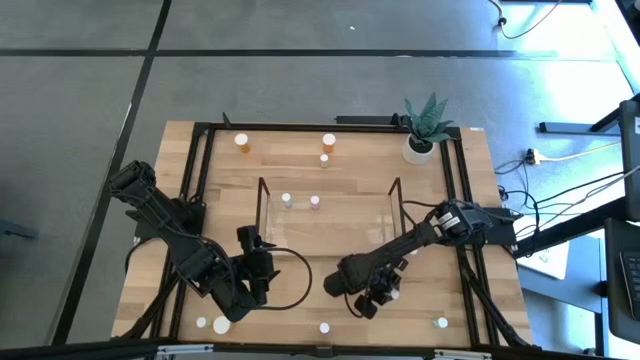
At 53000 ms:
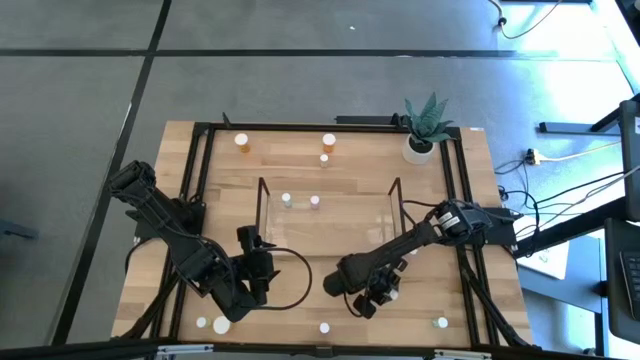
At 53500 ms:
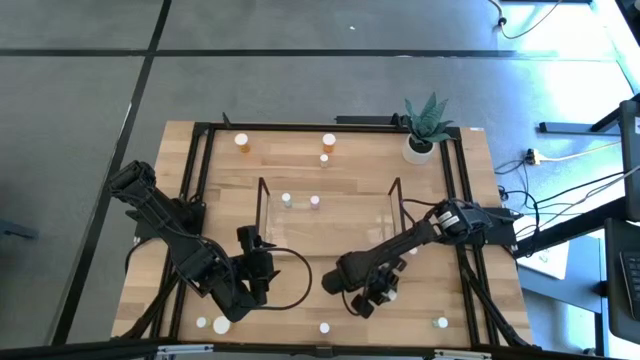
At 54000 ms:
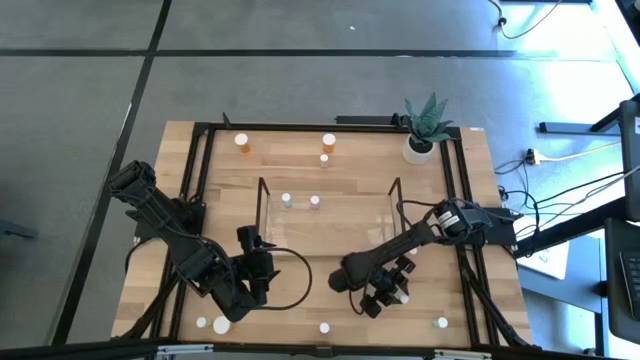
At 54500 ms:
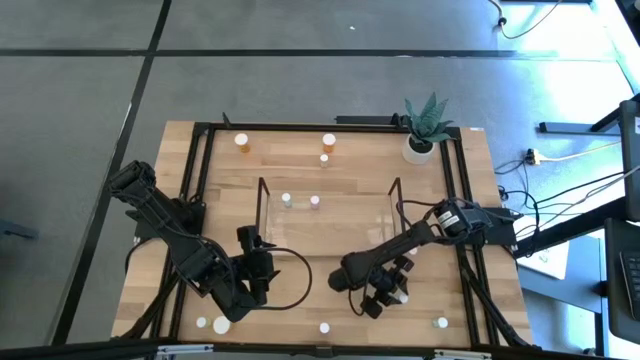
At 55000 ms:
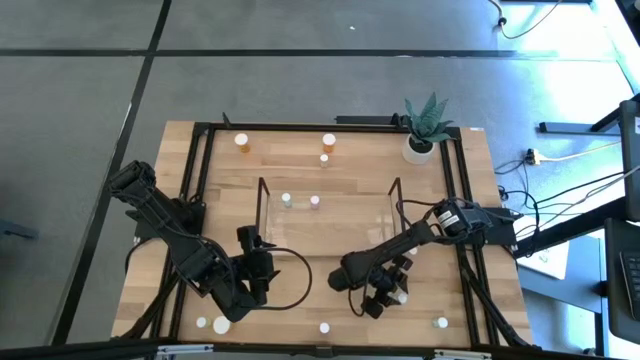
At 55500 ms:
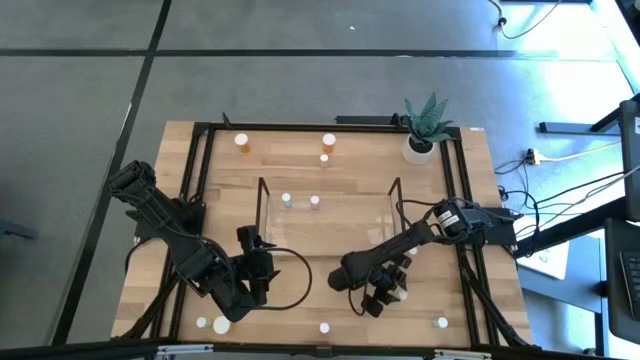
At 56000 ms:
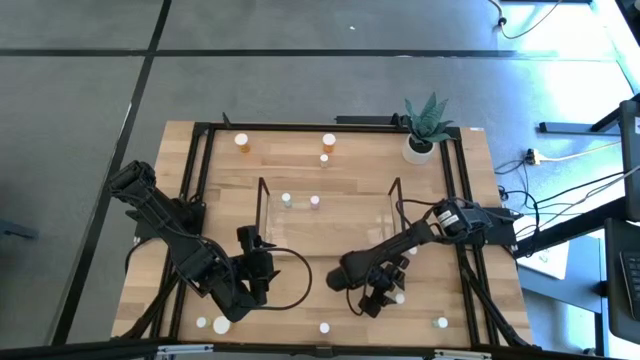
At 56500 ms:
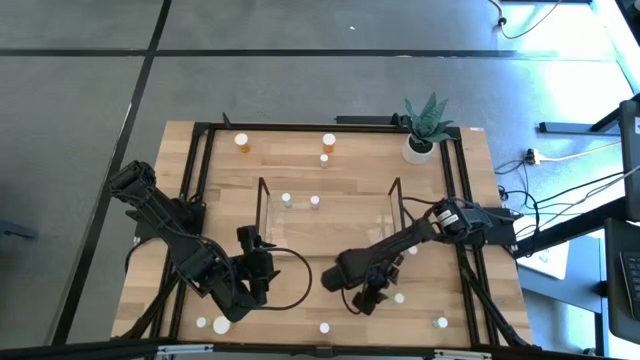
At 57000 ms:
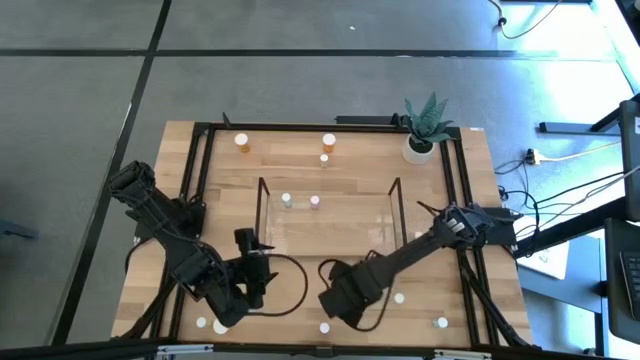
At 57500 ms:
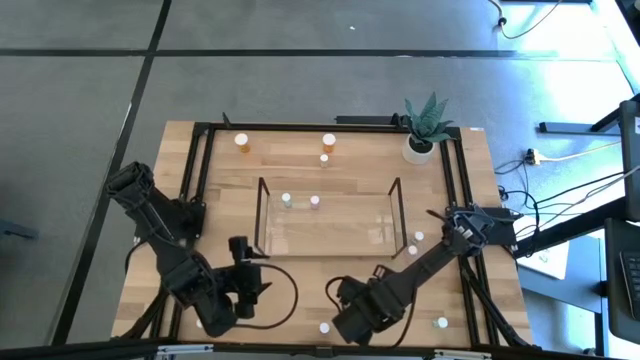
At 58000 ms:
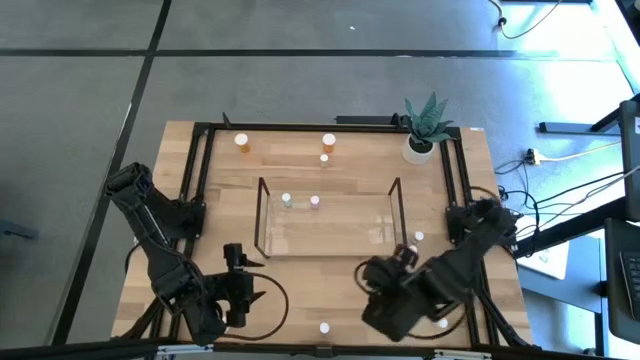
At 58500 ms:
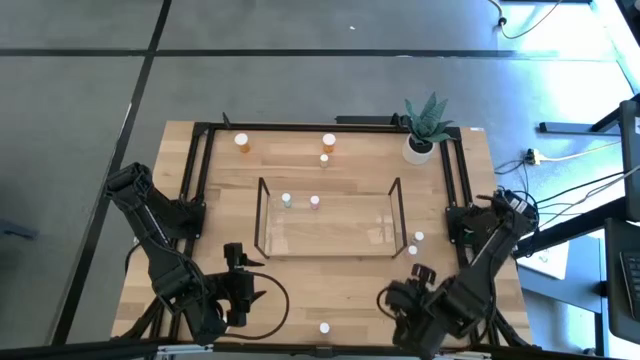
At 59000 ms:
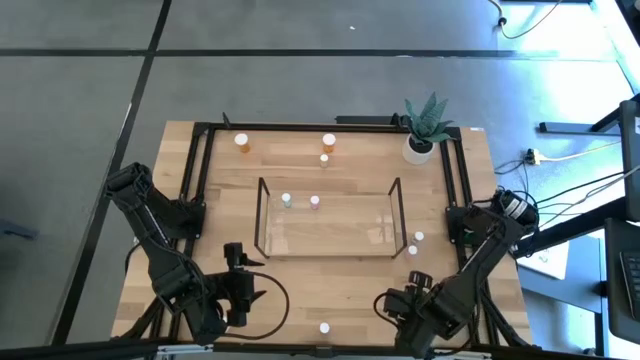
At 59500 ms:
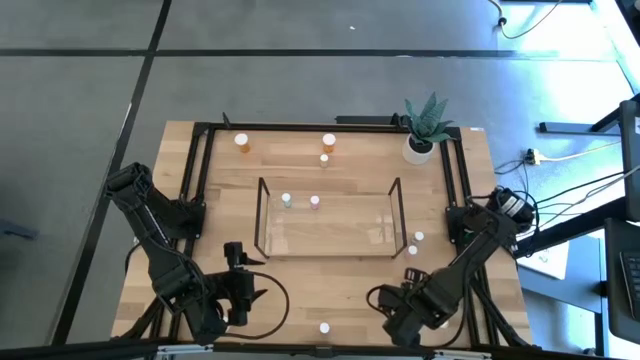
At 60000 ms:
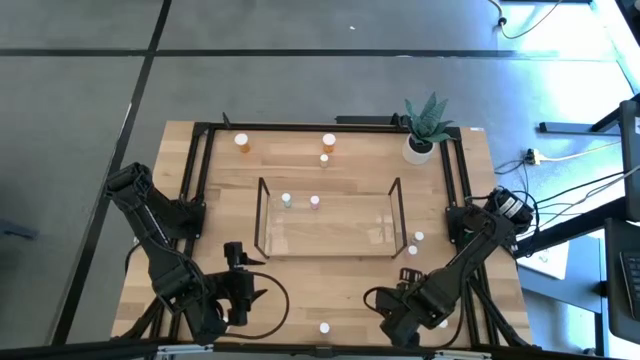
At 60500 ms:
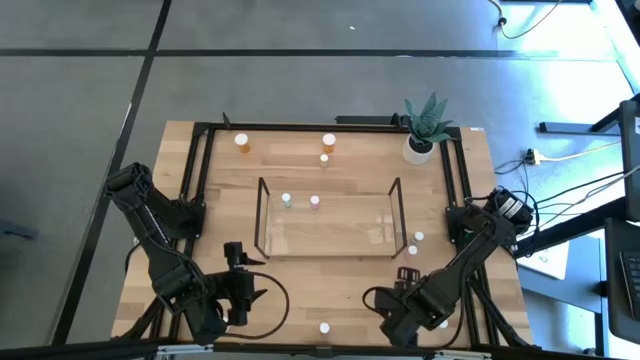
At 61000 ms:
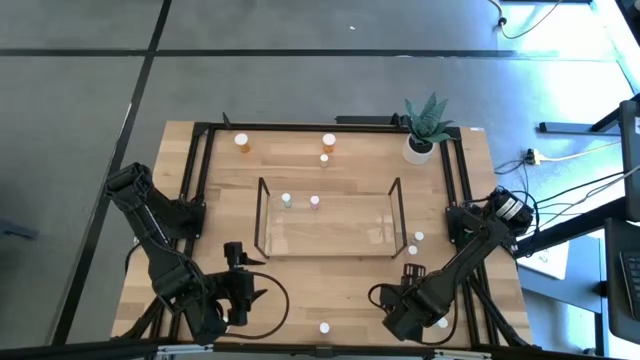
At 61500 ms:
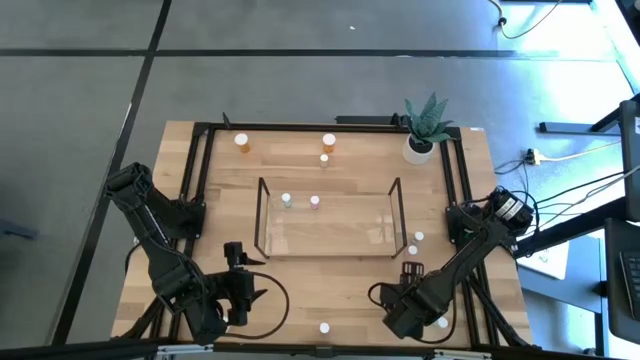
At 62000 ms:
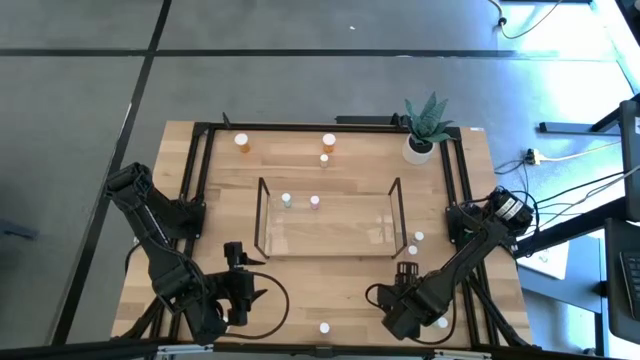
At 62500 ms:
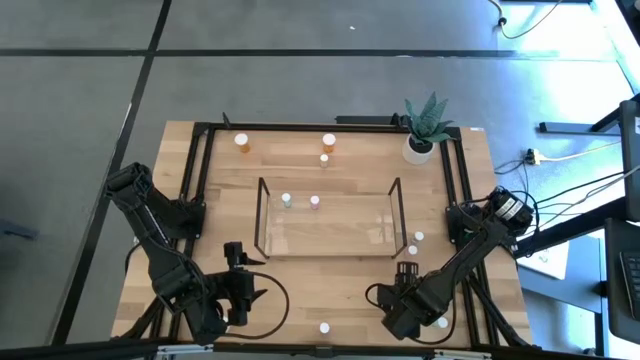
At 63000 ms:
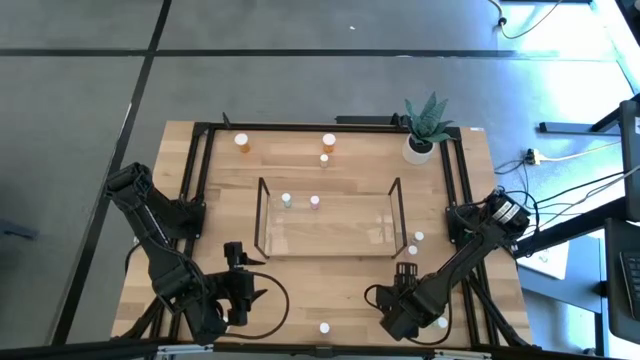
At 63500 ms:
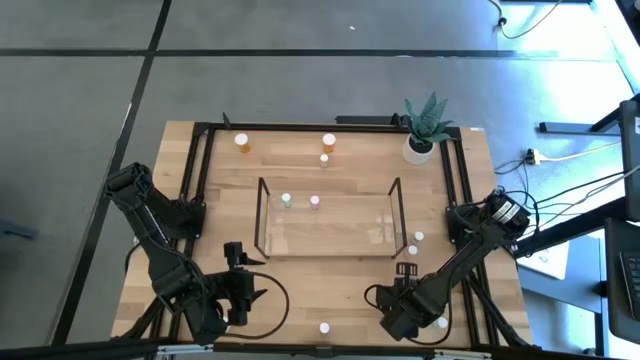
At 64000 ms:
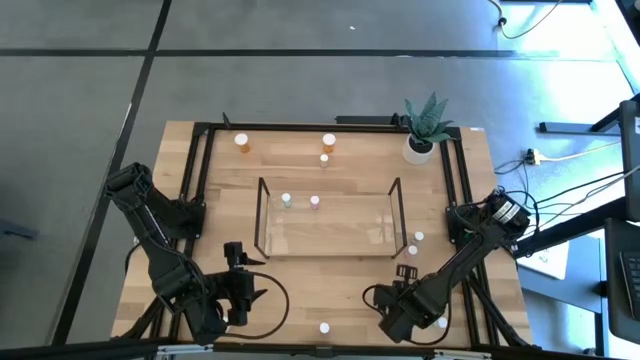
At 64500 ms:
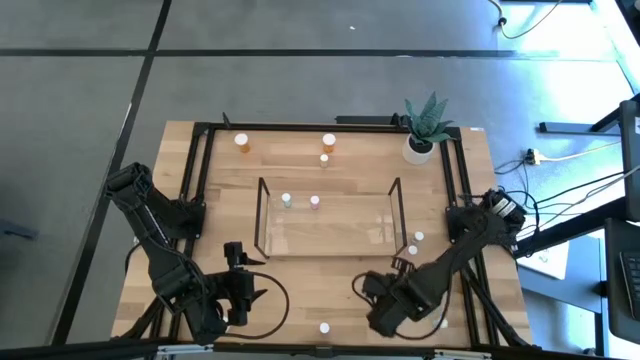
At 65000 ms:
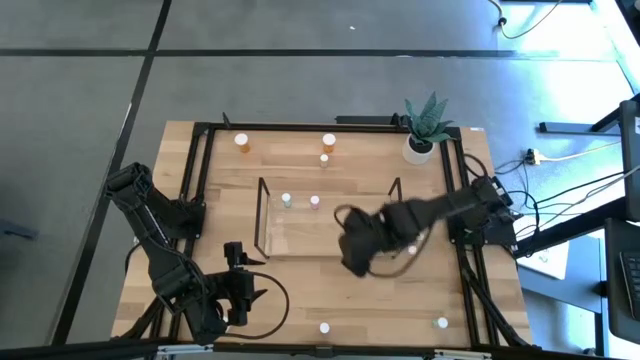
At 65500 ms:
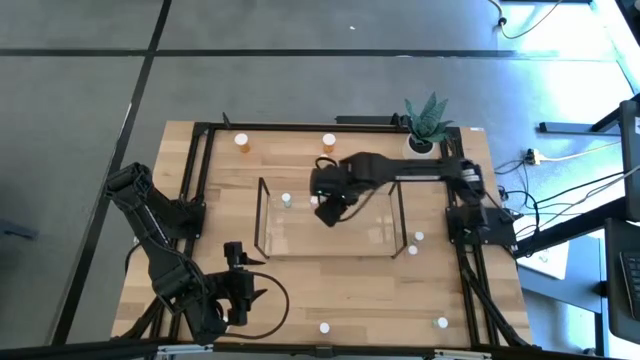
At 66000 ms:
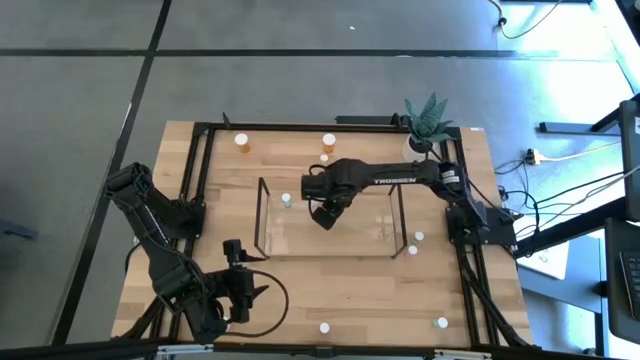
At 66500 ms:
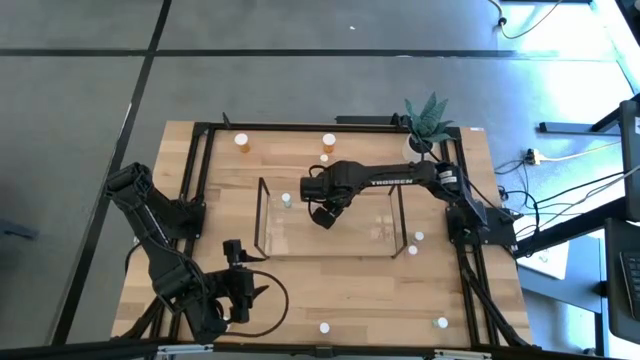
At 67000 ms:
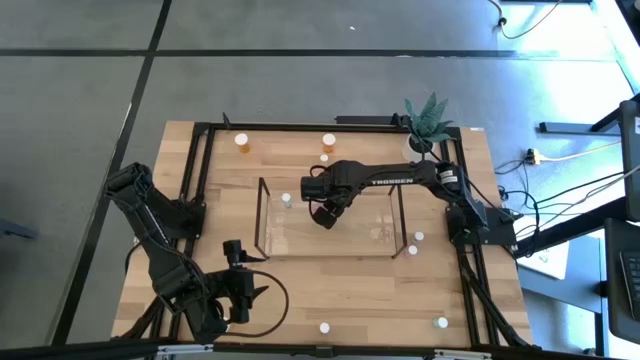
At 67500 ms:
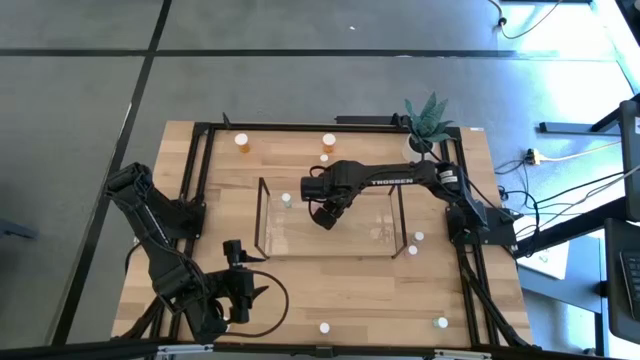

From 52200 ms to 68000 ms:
Task: Pick and place medicine bottles onto shelf by color
Put the bottom right yellow pill bottle on the shelf

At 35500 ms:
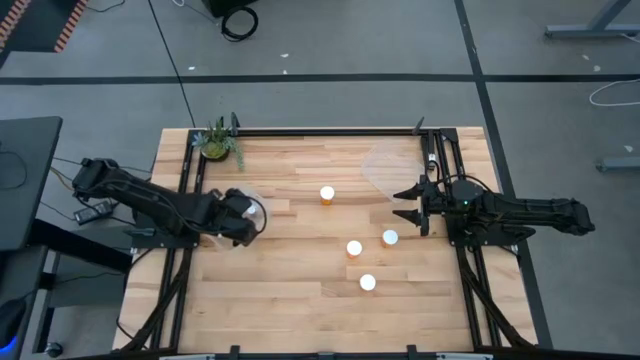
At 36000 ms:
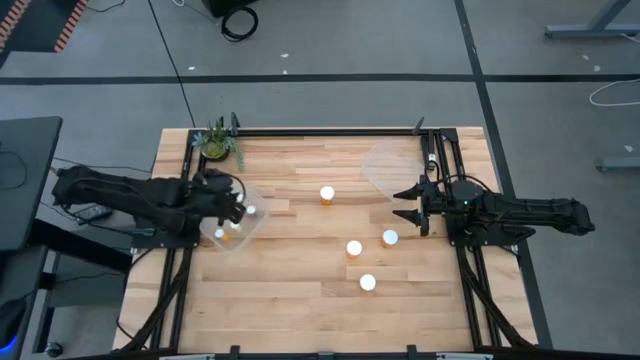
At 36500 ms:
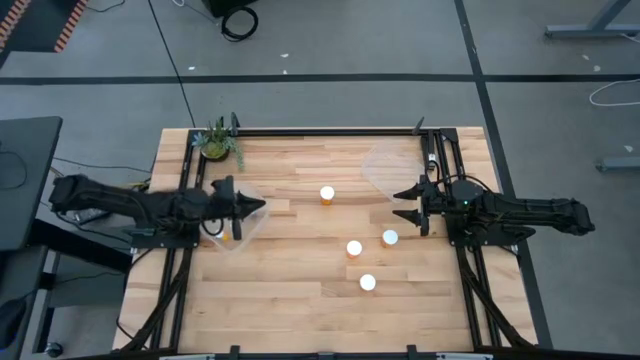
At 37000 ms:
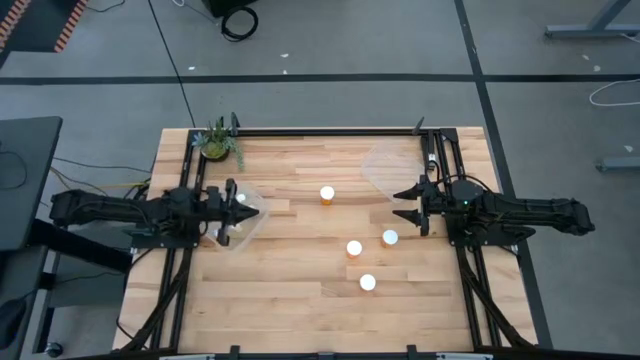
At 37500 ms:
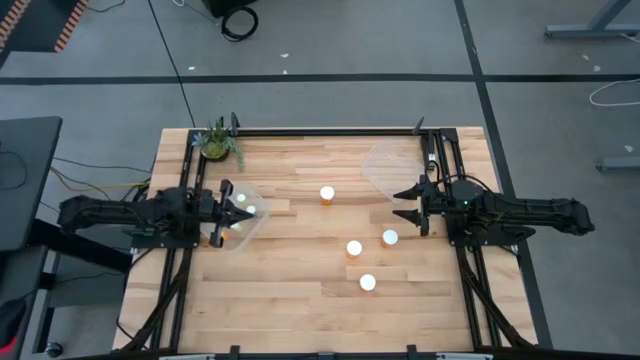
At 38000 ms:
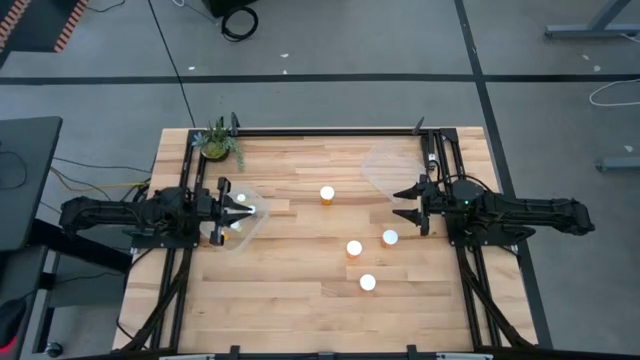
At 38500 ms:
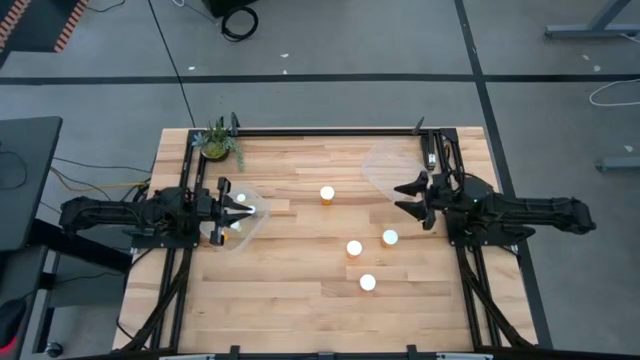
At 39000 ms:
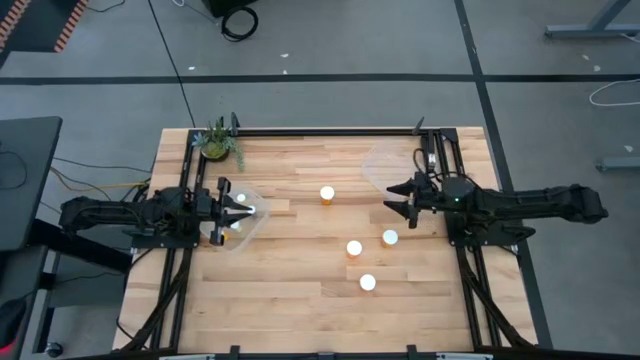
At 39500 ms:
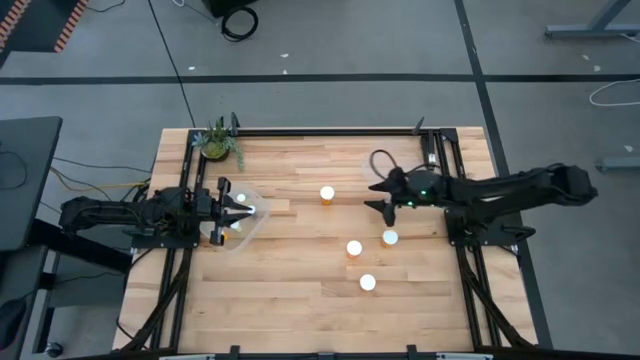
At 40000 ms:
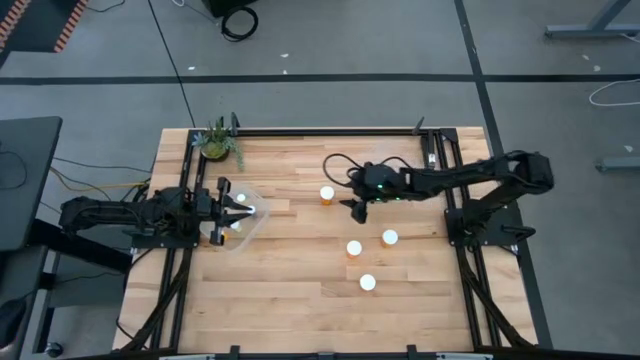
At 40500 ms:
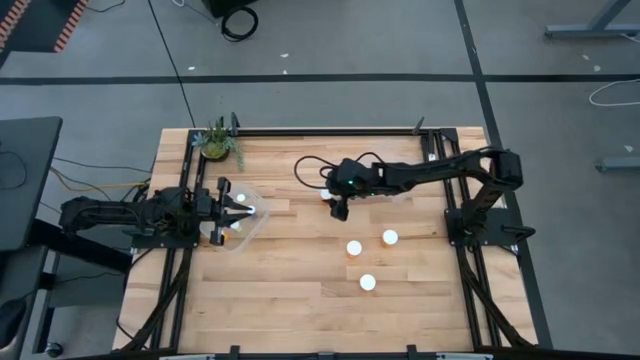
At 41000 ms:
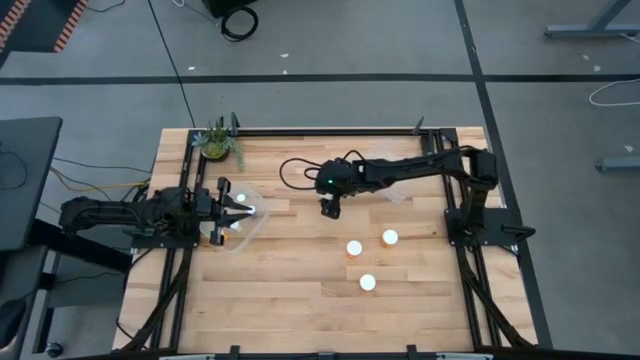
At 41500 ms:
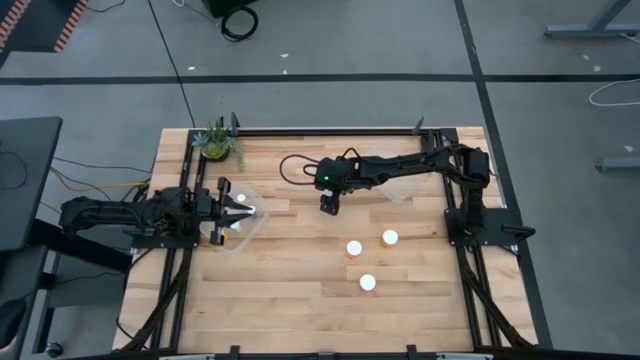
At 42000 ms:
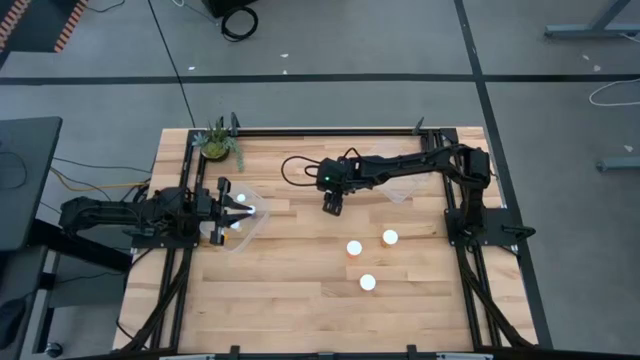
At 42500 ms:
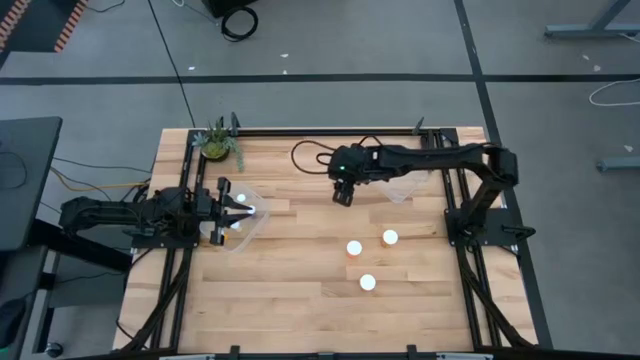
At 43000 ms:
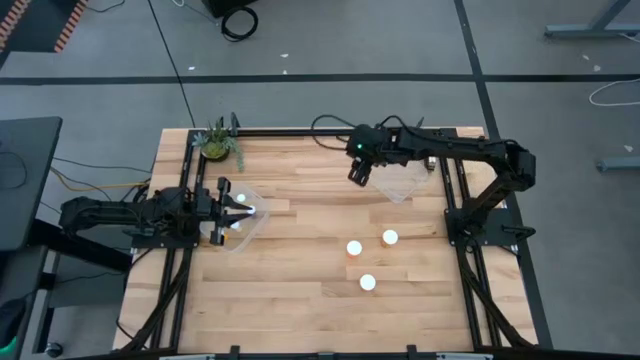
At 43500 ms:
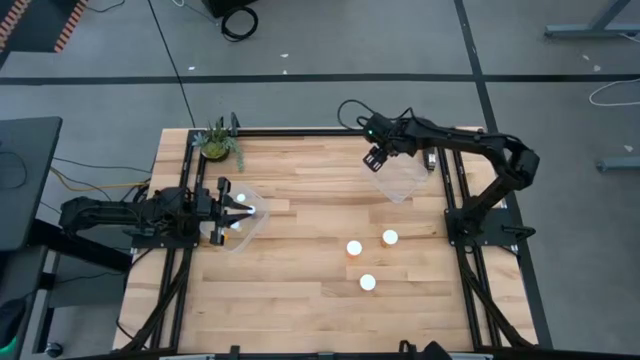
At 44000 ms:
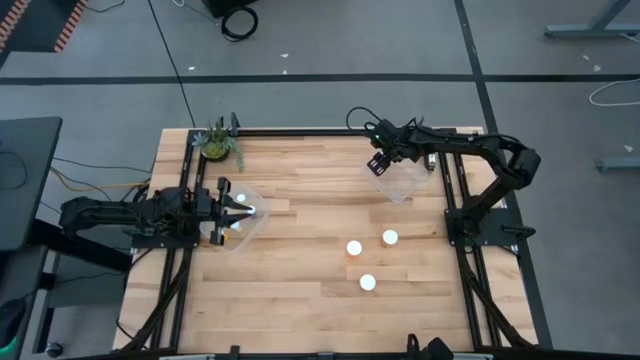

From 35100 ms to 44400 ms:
Task: Pick and place medicine bottles into bin by pill shape (circle, oval)
Put the large orange pill bottle into the right transparent bin
